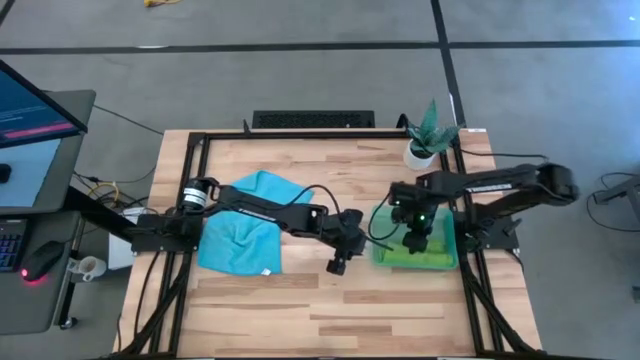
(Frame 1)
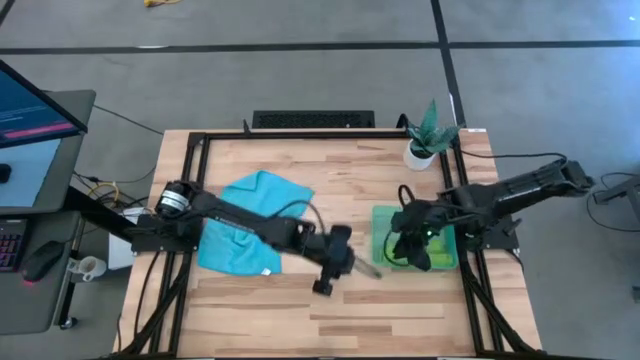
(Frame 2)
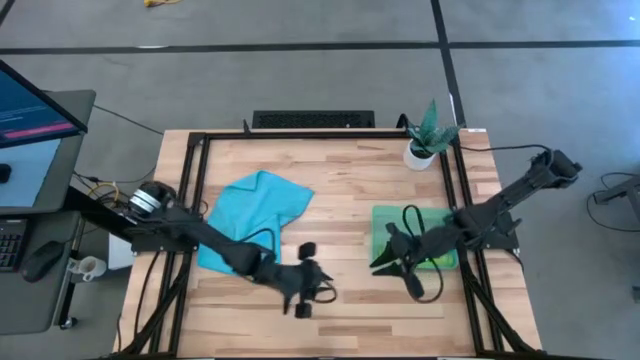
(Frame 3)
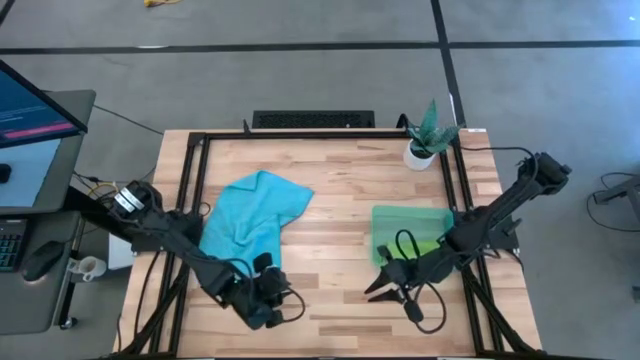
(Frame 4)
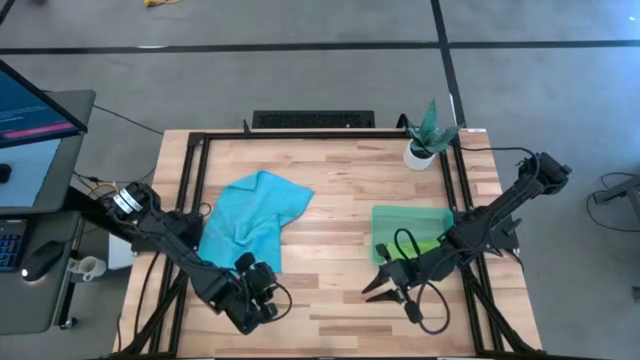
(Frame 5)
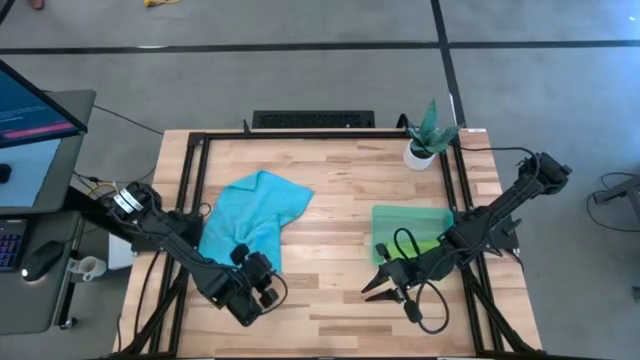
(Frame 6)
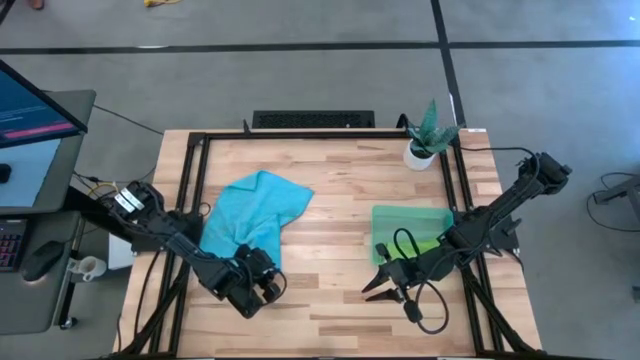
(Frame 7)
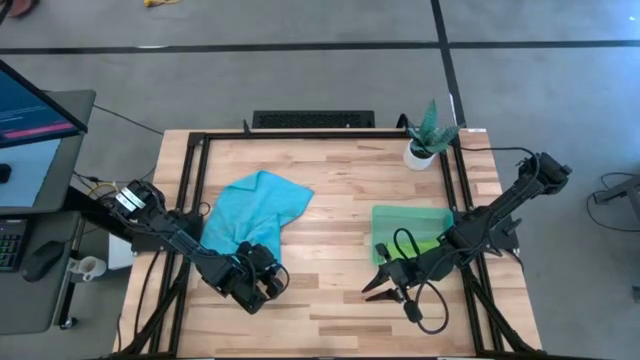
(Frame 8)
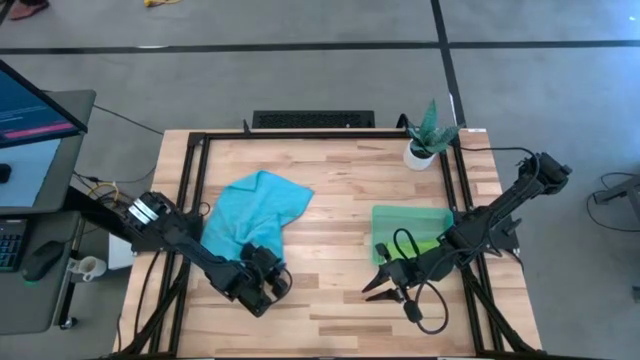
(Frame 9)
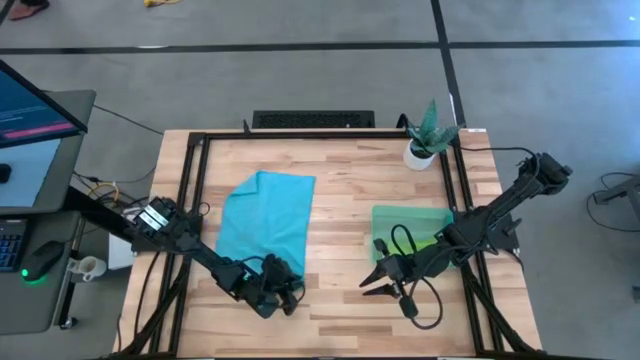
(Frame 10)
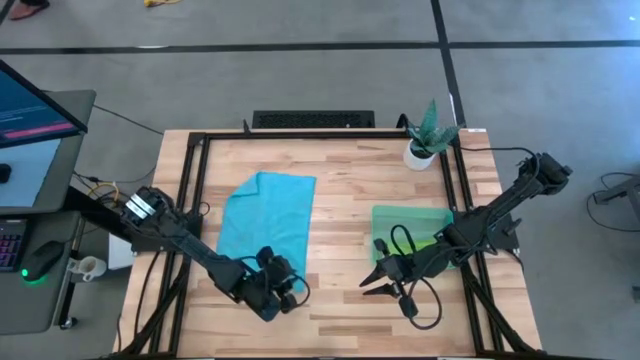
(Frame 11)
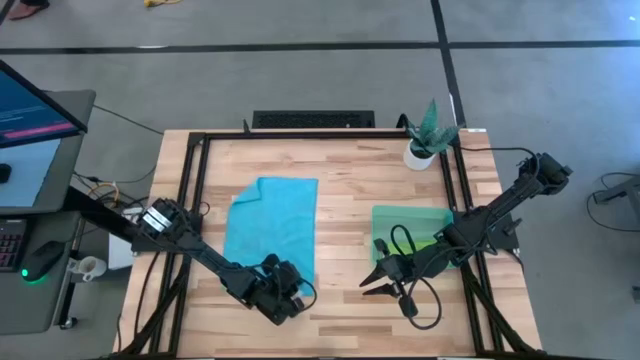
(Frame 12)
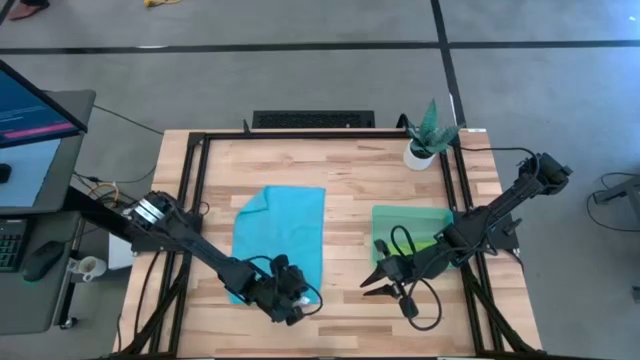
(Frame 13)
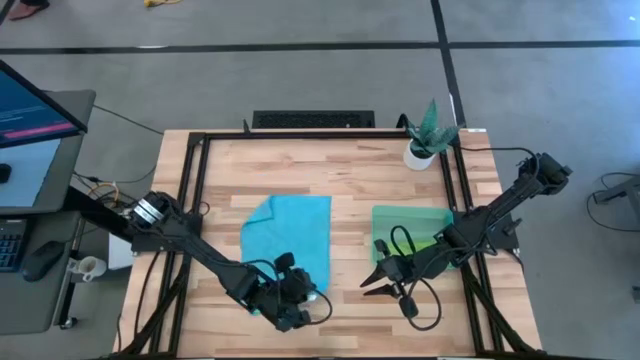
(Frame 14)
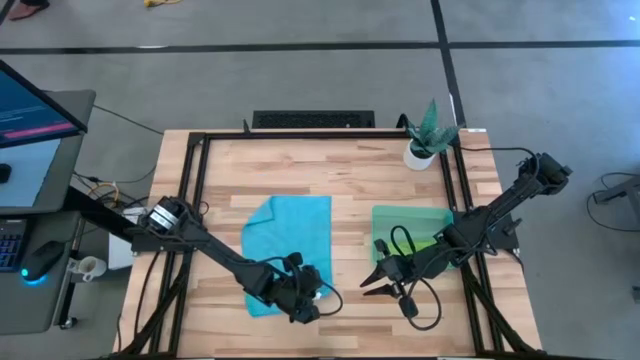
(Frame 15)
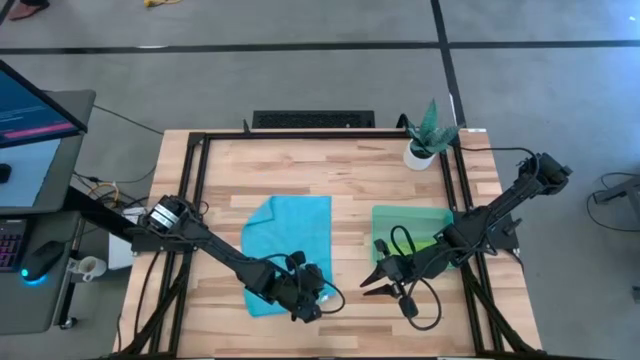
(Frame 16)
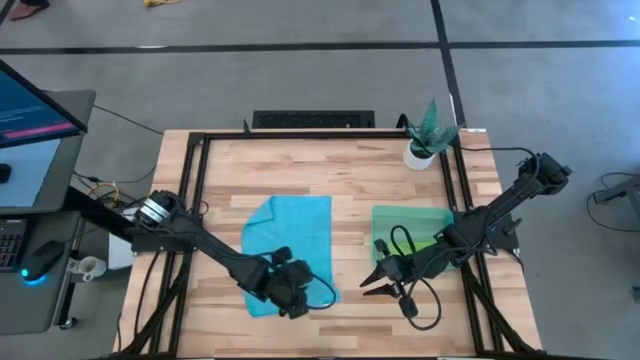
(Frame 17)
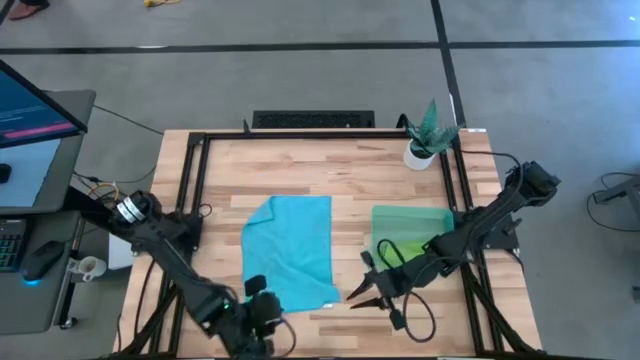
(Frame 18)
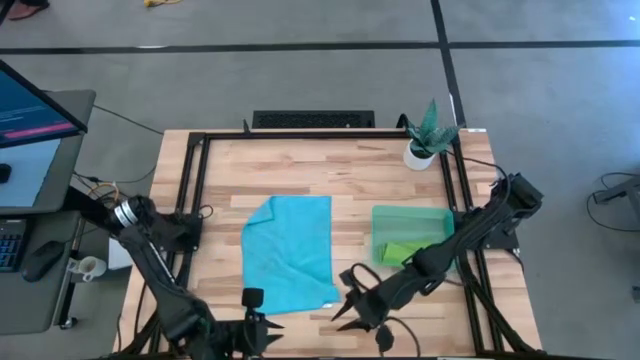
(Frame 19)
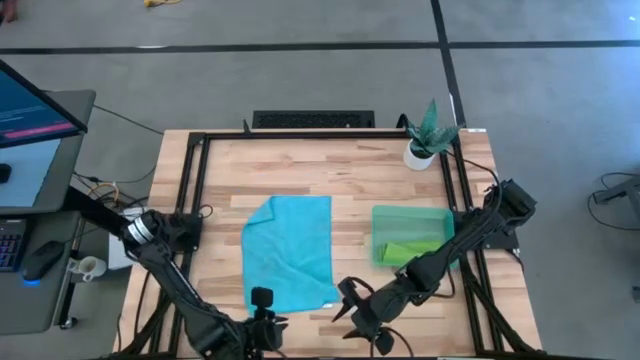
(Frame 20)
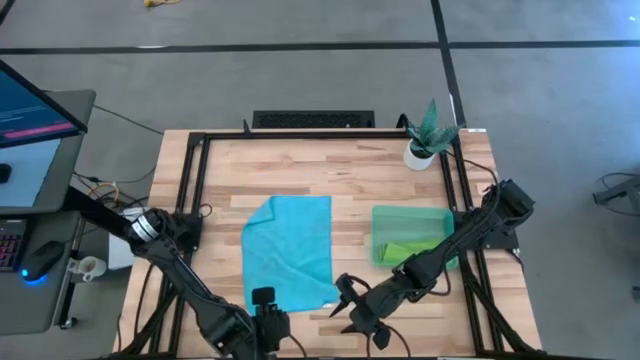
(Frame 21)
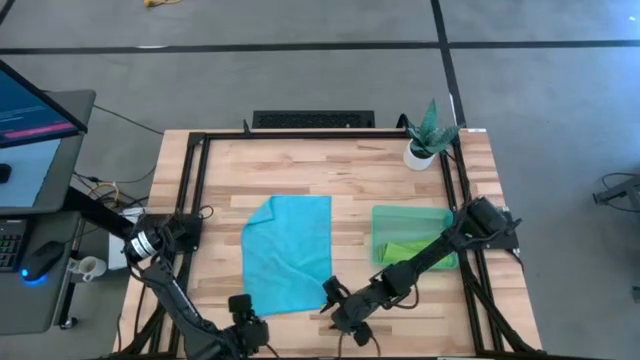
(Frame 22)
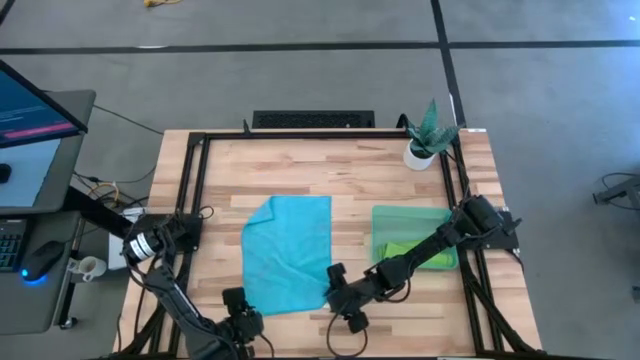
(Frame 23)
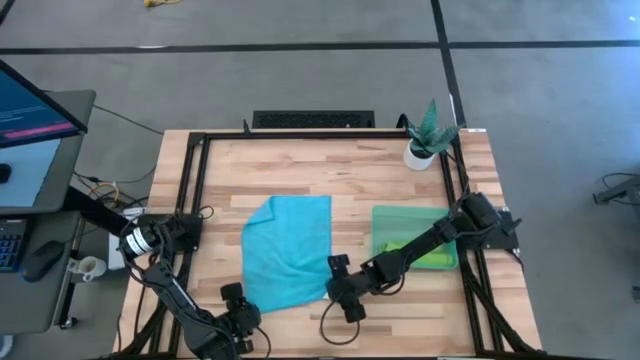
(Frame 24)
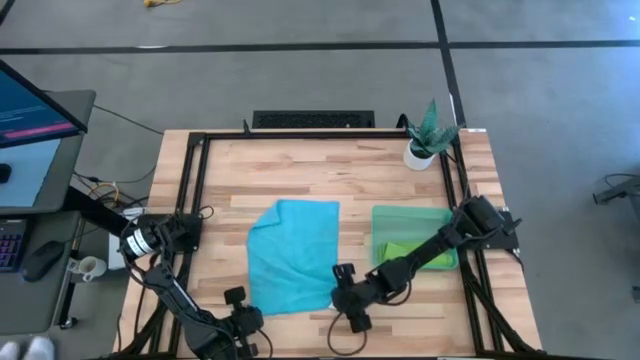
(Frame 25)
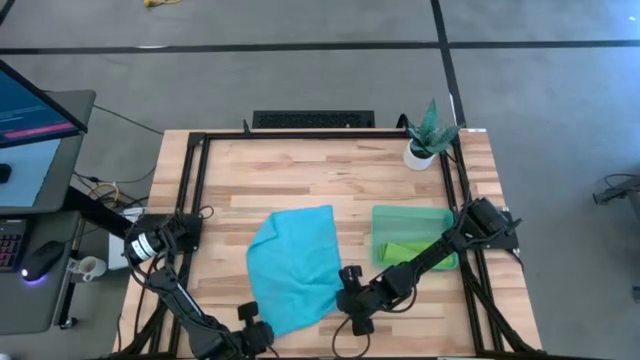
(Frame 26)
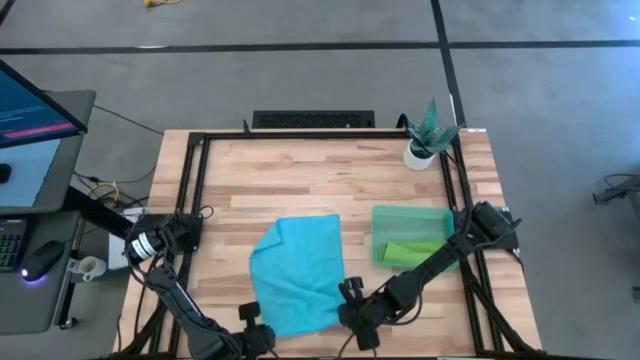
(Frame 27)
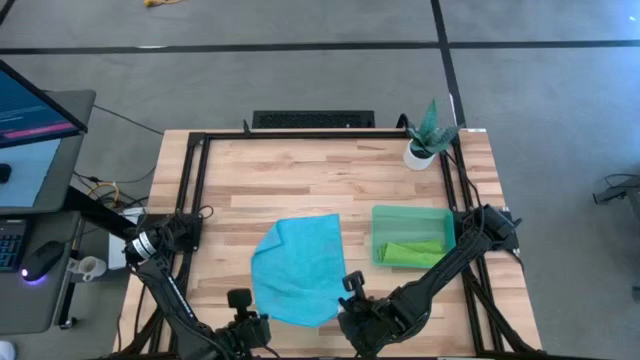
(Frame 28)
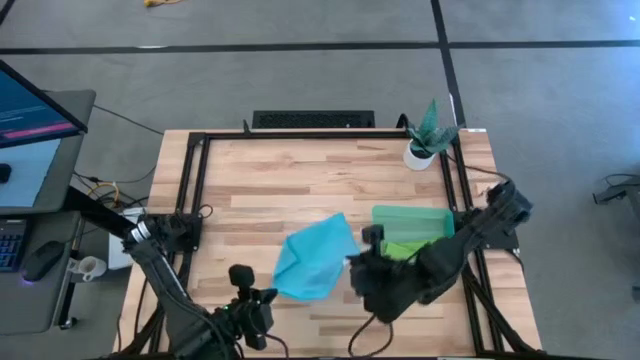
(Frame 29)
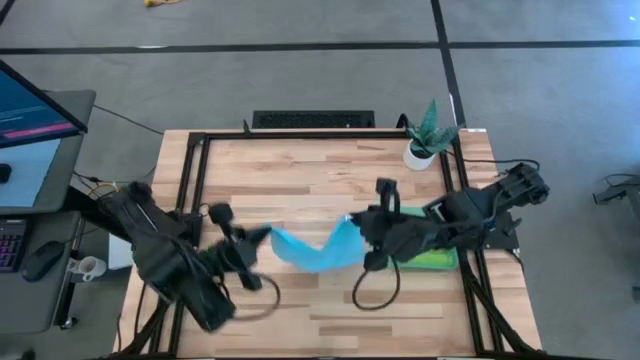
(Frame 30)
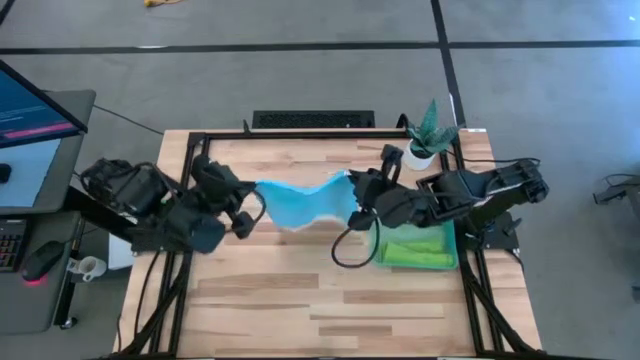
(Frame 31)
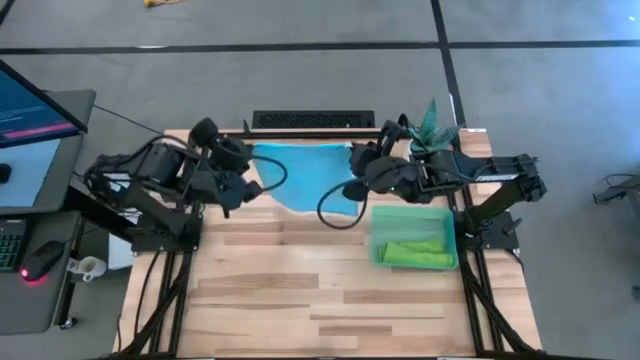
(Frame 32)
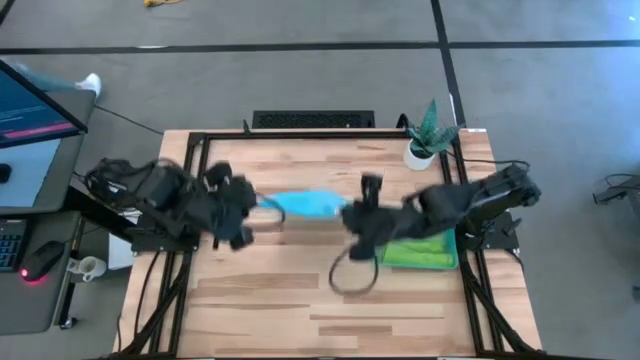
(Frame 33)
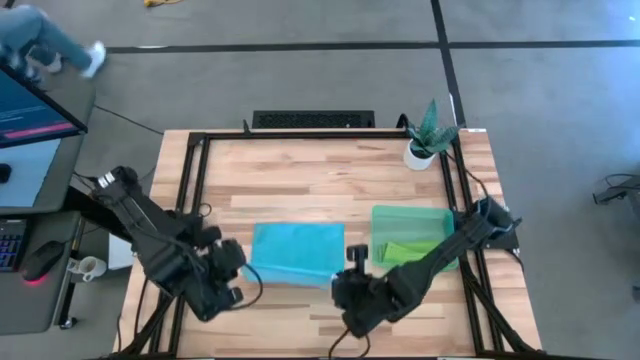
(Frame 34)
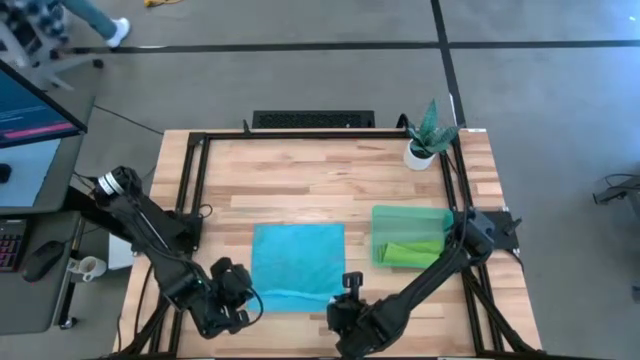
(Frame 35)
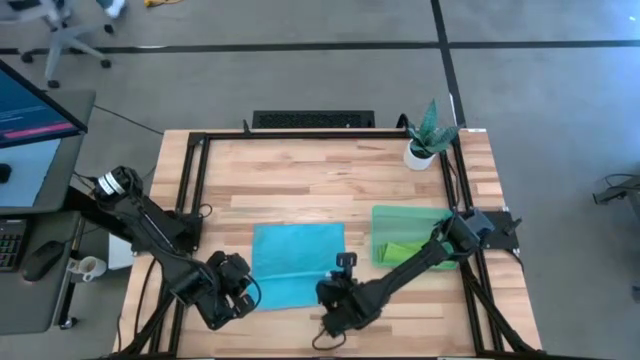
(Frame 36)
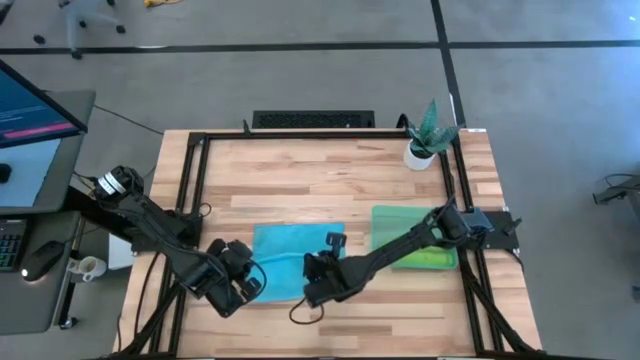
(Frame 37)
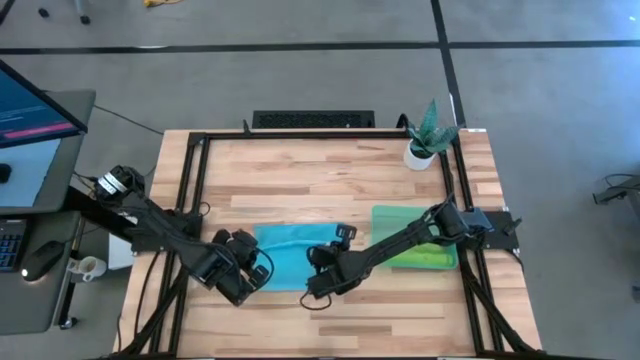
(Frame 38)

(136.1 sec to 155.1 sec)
Task: Roll microfiber towels into tight, uniform cylinder then place into a basket
Fold the blue towel

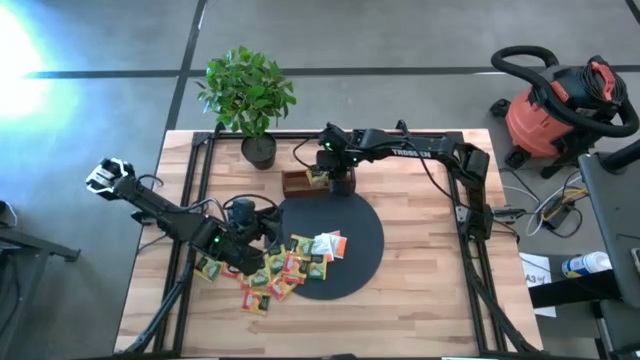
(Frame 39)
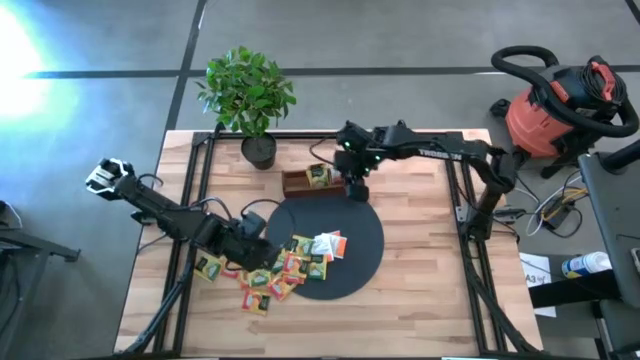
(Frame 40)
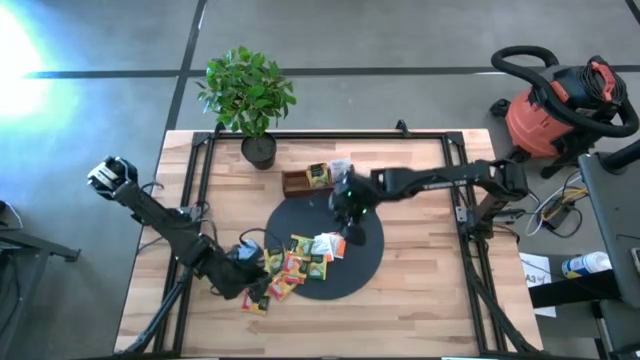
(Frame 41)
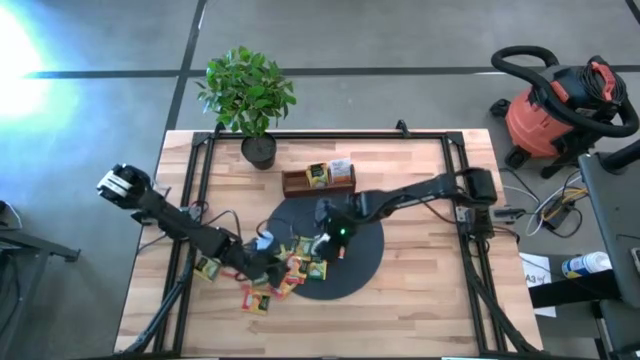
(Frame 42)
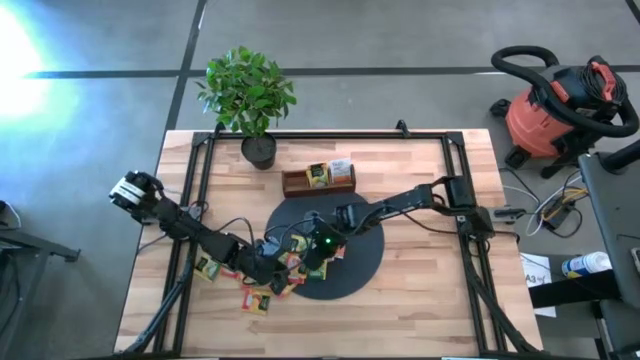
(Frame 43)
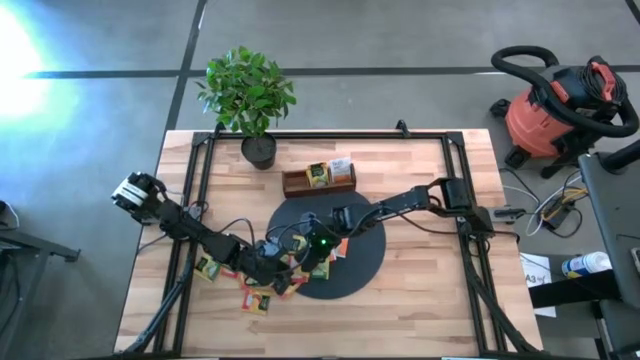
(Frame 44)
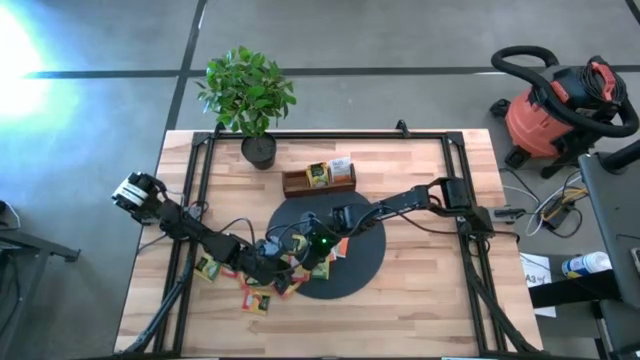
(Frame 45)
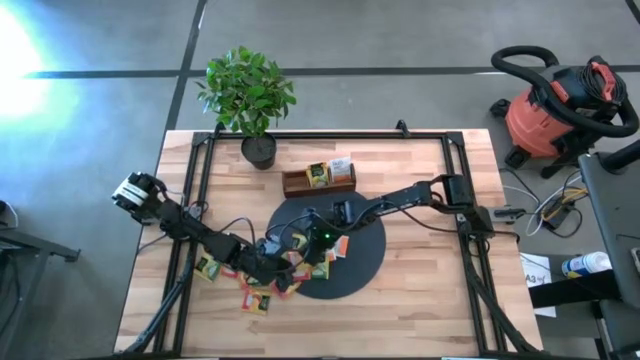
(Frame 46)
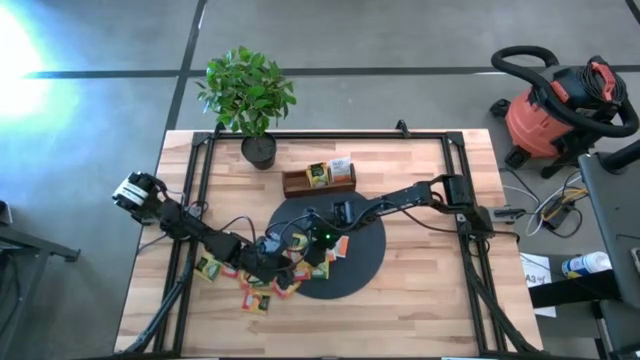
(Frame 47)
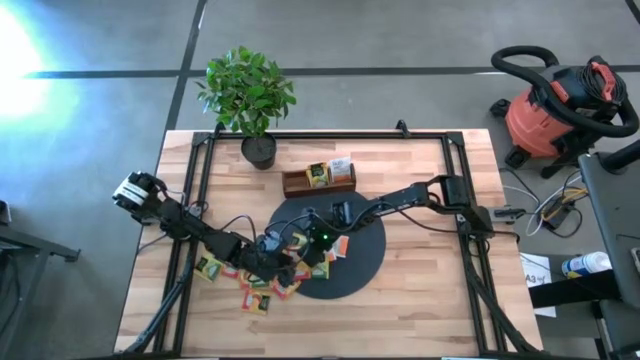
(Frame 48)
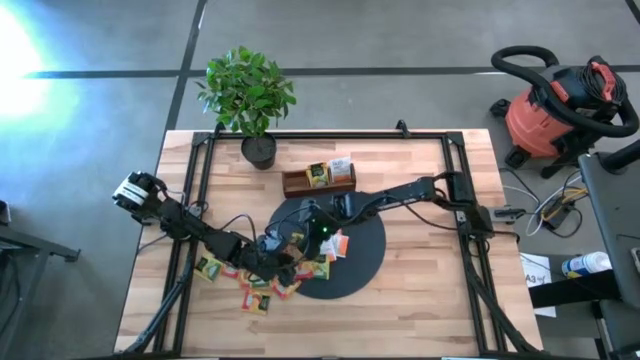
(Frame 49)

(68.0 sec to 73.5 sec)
Task: Pick & Place Tea
Put the orange tea bag into the left slot of the wooden organizer
